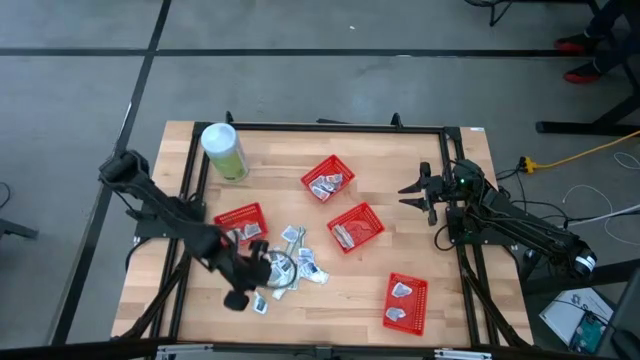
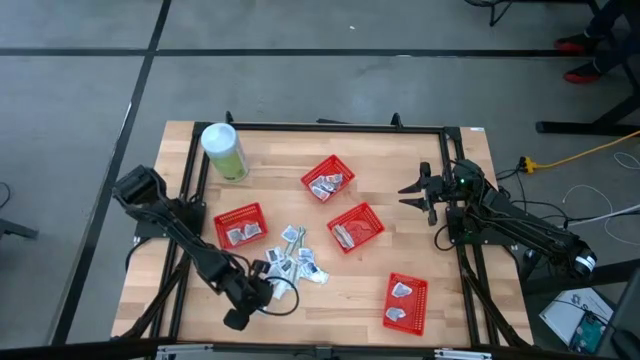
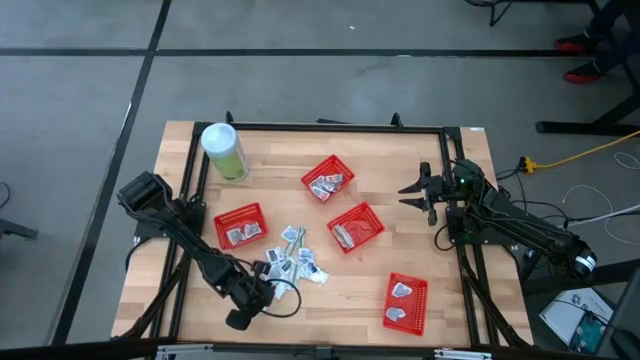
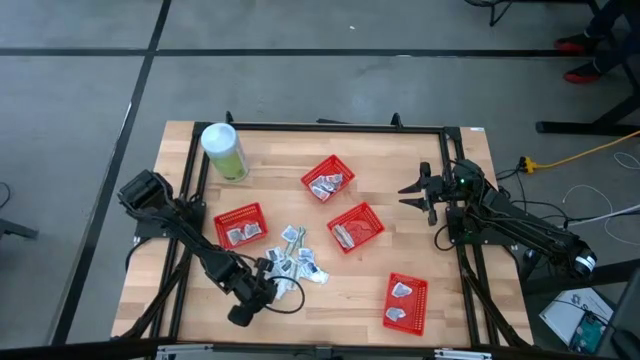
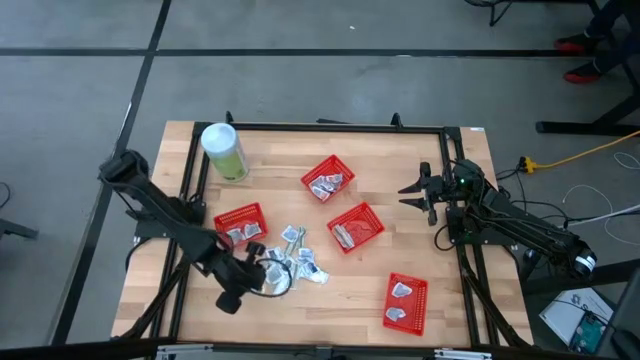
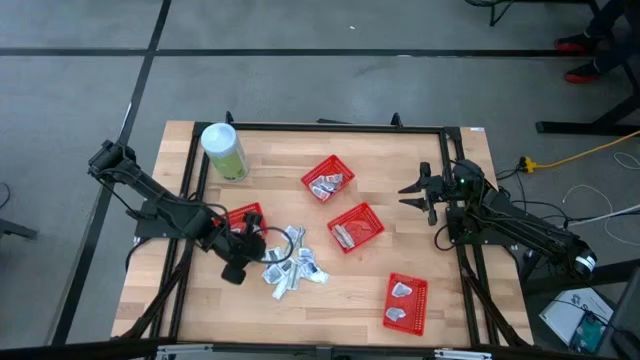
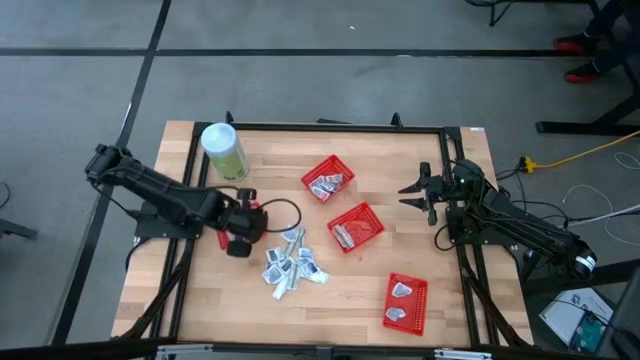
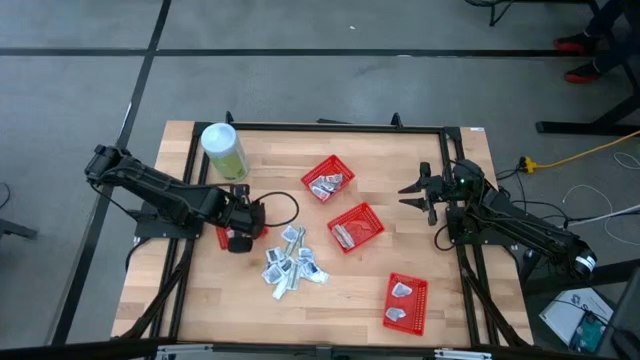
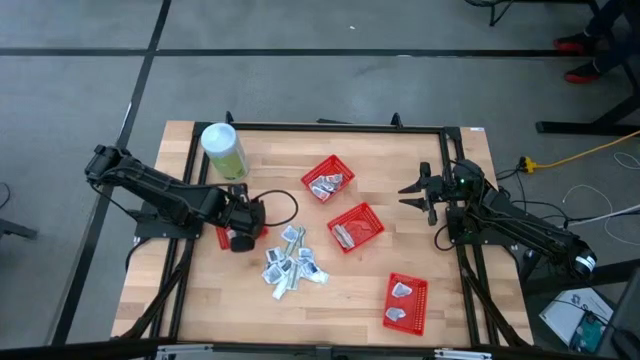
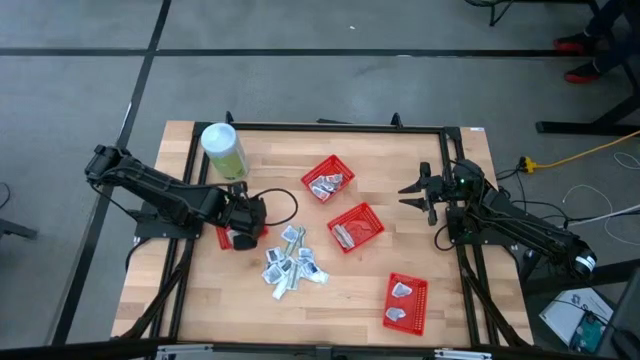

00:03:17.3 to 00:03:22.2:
Task: Pick & Place First Aid Supplies
Put the gray towelette pad into the red container

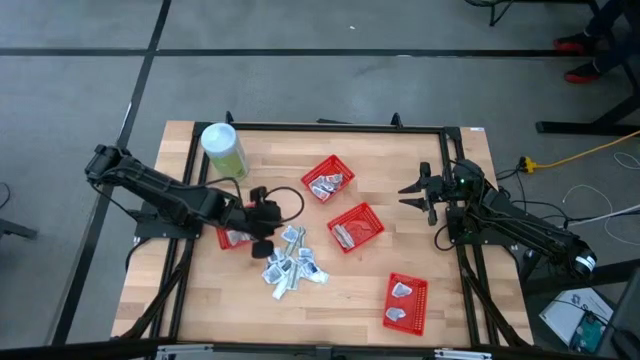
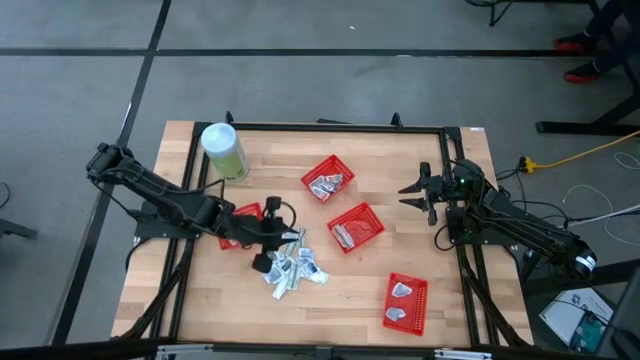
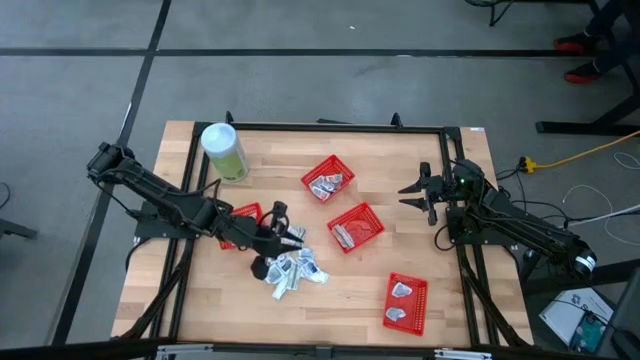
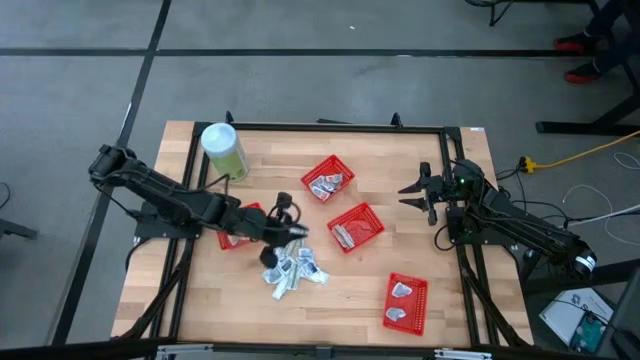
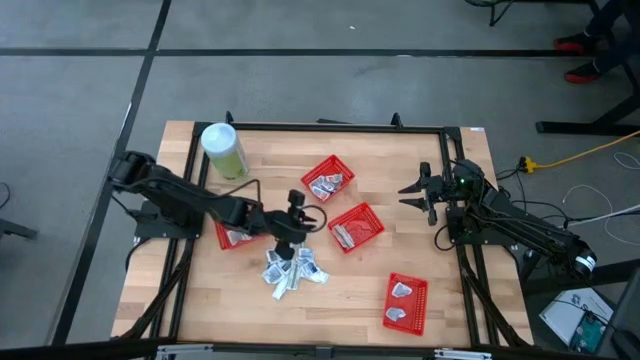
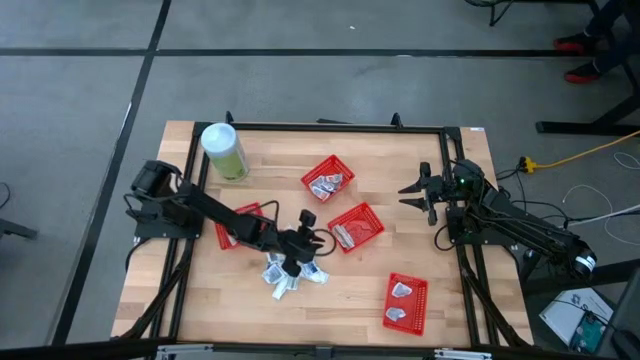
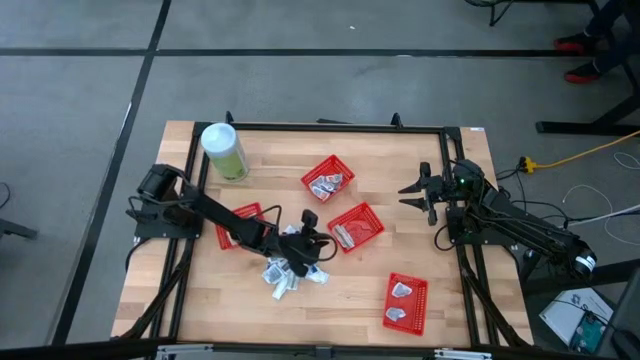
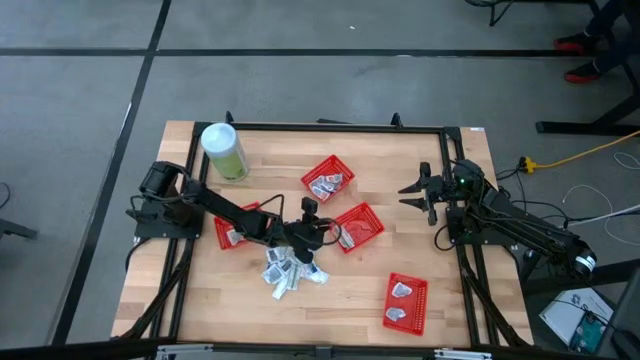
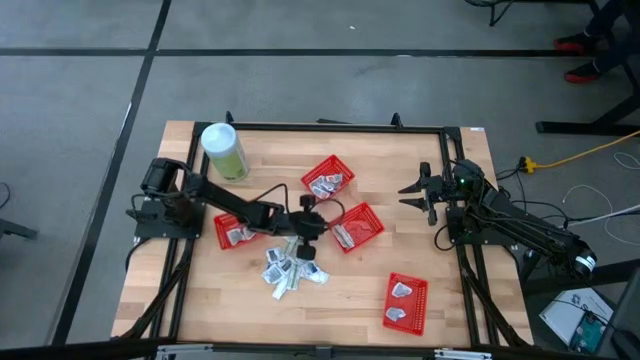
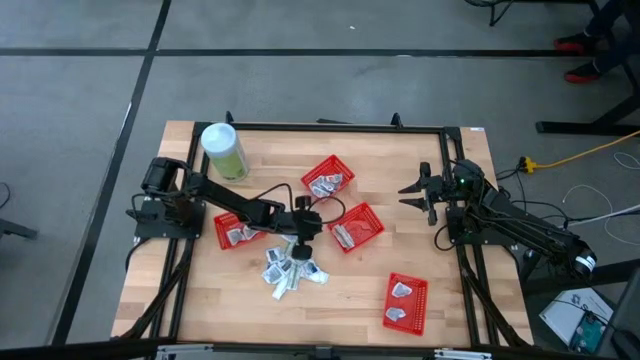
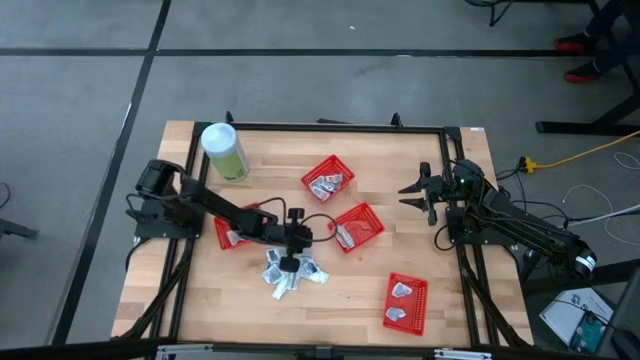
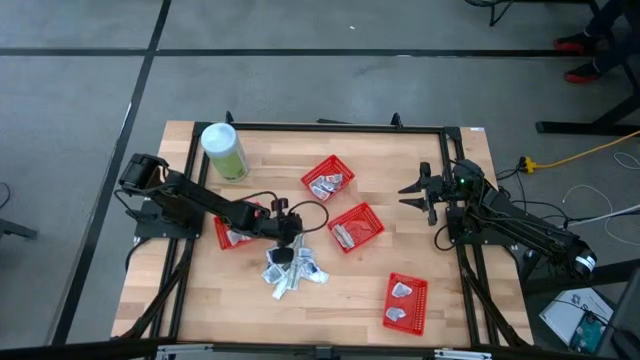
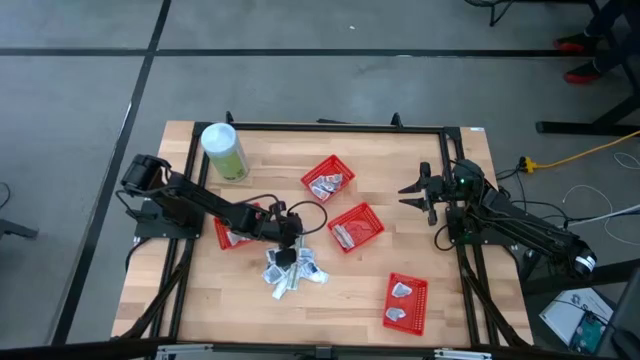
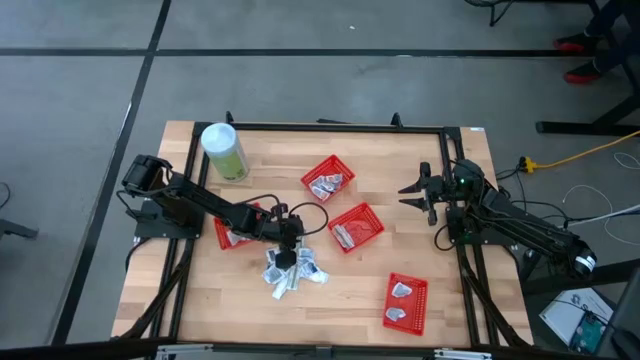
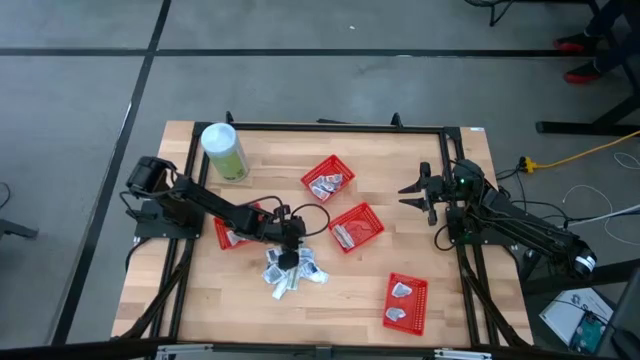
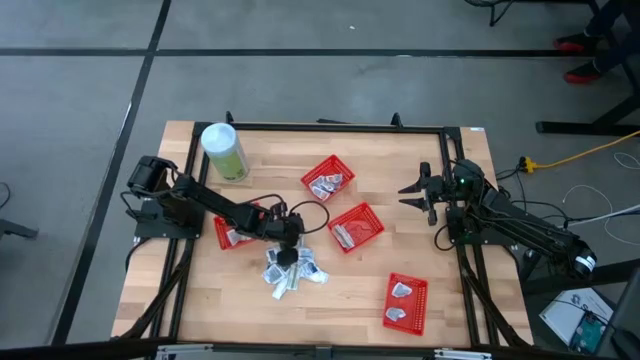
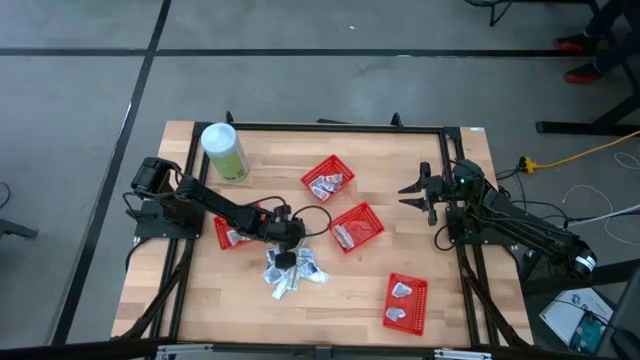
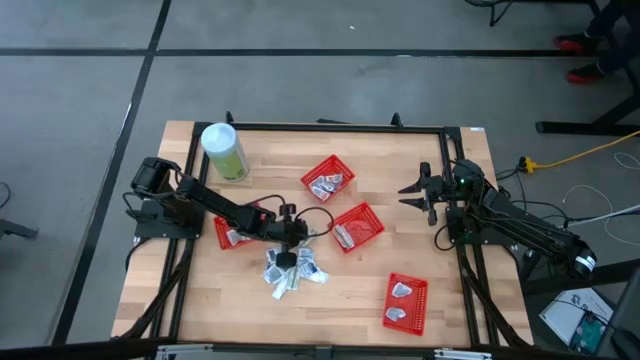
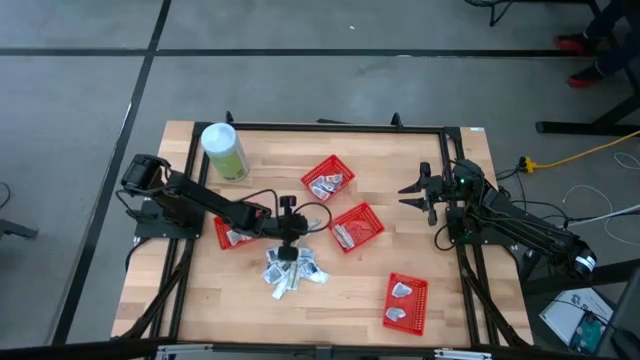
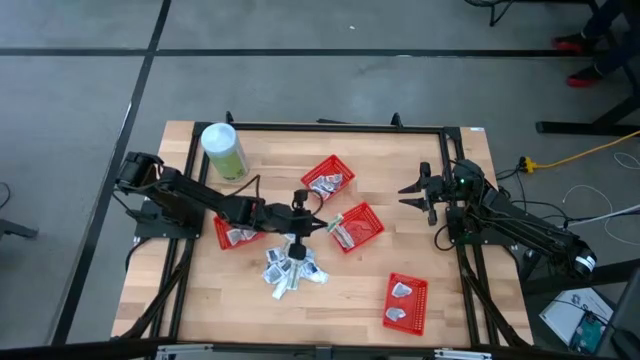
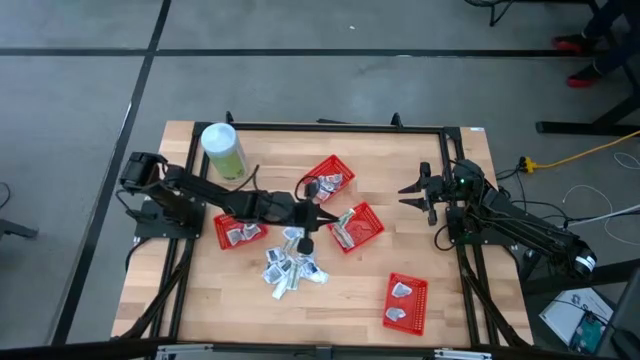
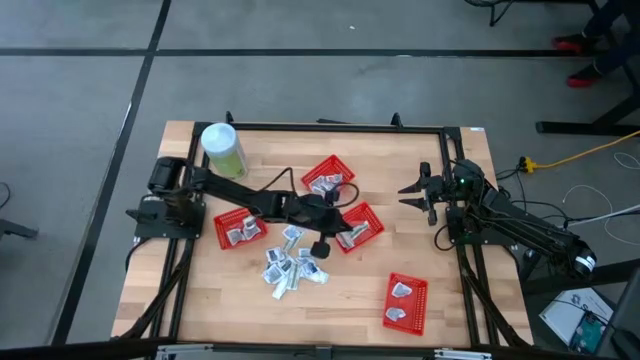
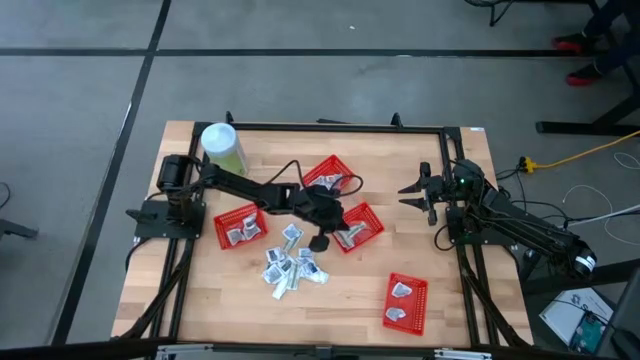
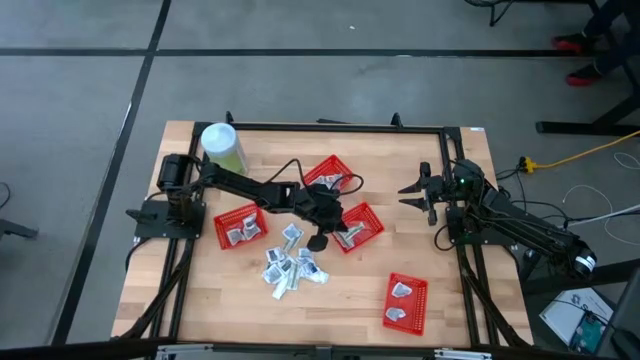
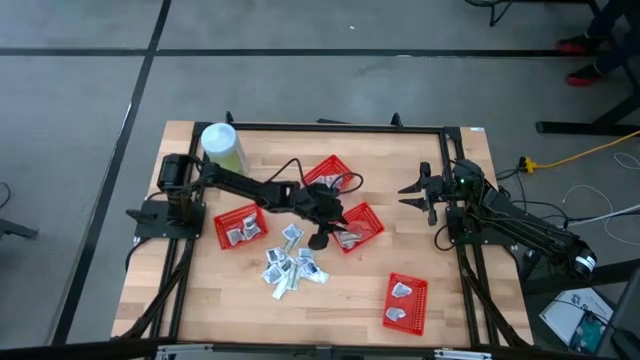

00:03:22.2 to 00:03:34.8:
Put the green bandage into the red container

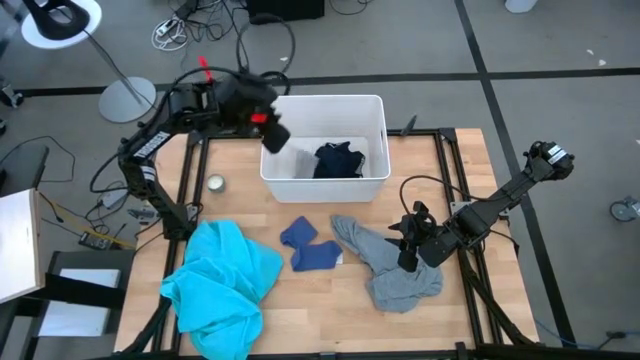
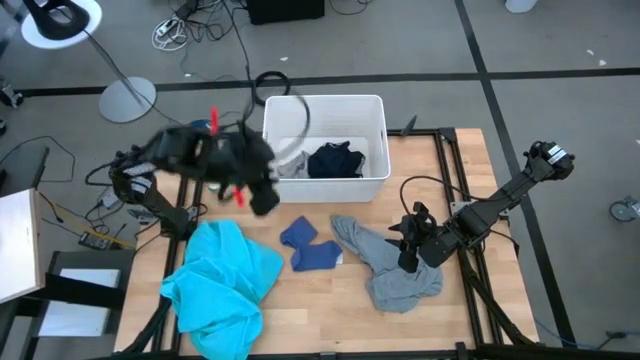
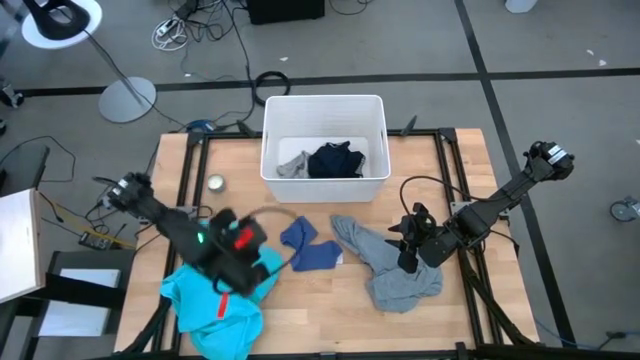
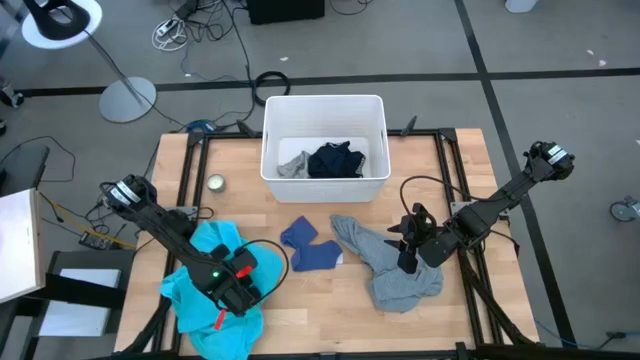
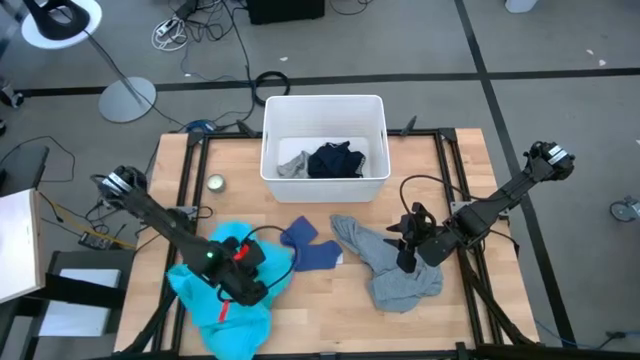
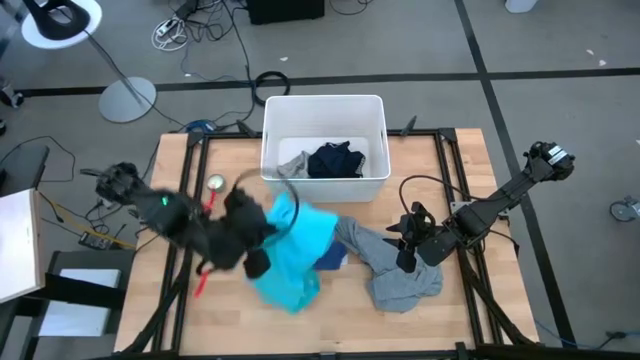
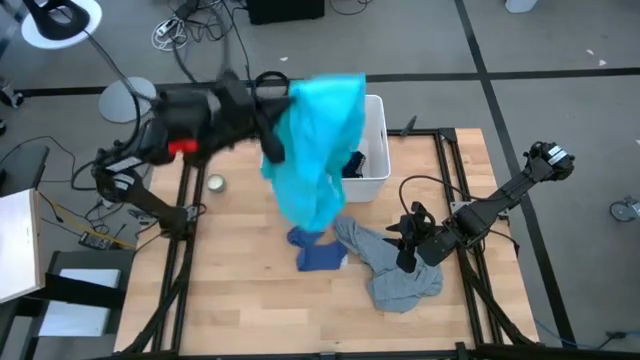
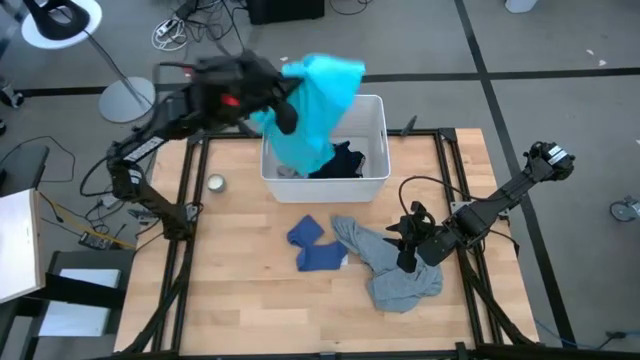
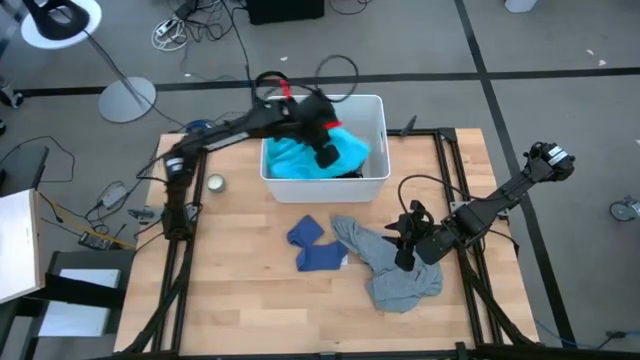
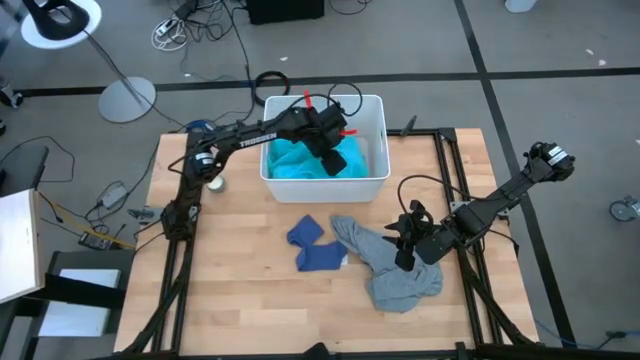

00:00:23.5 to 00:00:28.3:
Task: Sort clothes
Put the blue shorts into the laundry bin
